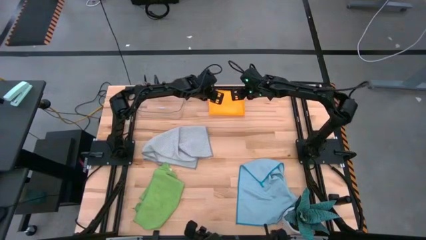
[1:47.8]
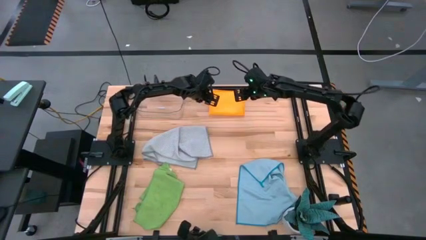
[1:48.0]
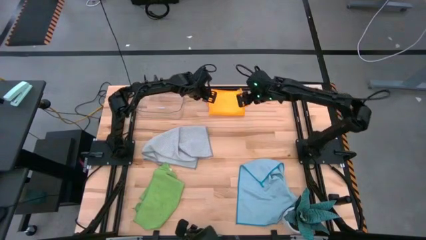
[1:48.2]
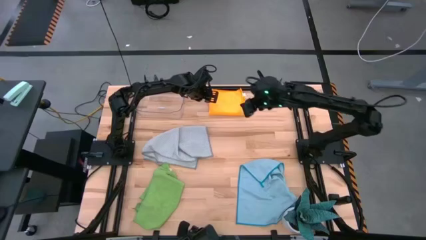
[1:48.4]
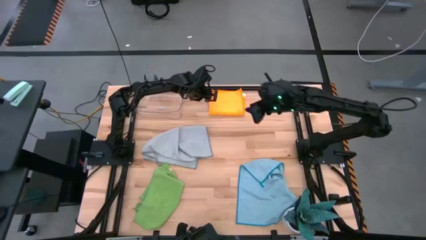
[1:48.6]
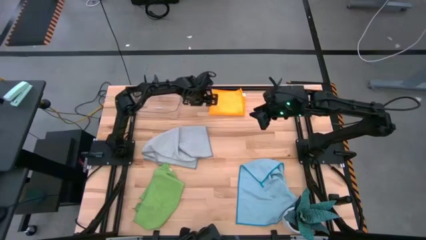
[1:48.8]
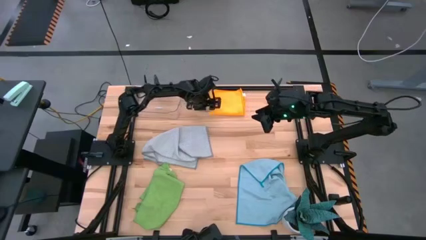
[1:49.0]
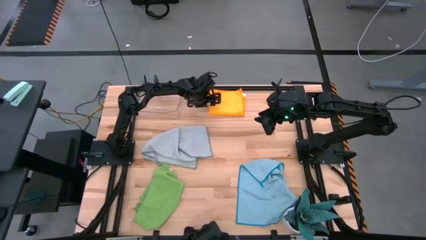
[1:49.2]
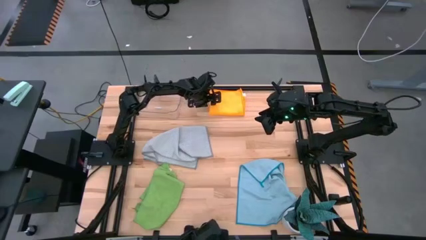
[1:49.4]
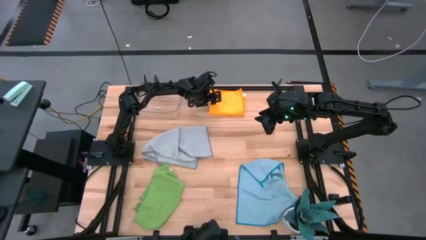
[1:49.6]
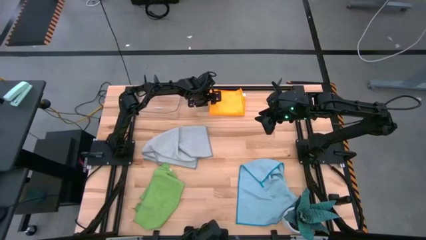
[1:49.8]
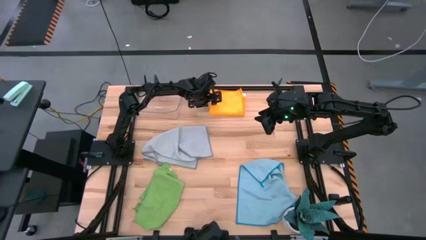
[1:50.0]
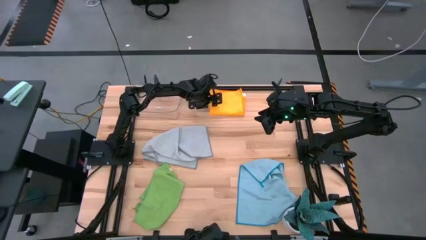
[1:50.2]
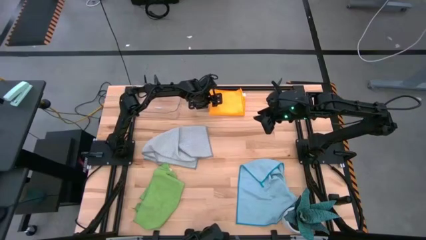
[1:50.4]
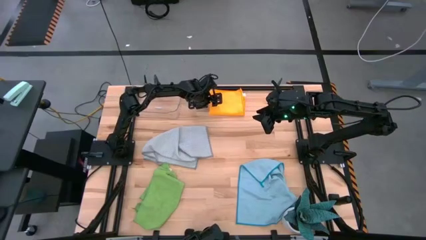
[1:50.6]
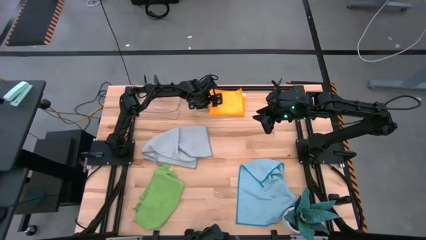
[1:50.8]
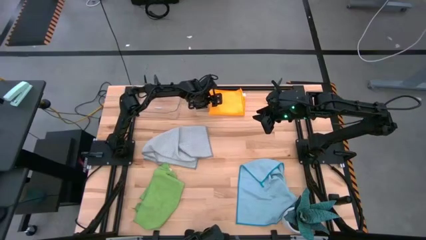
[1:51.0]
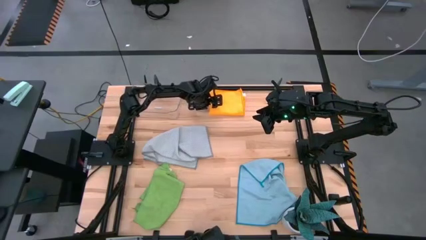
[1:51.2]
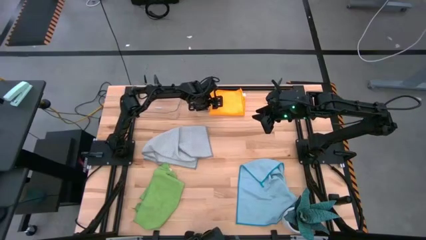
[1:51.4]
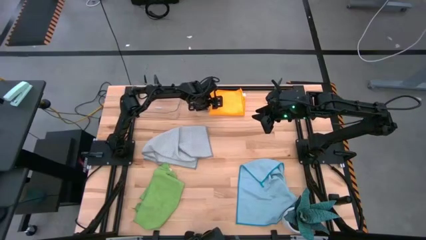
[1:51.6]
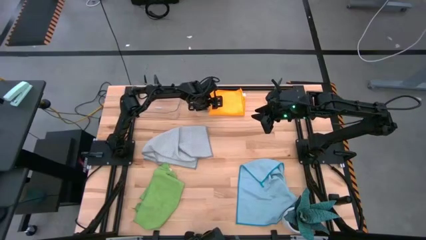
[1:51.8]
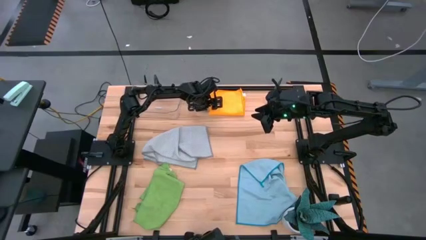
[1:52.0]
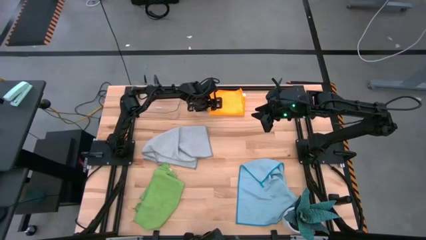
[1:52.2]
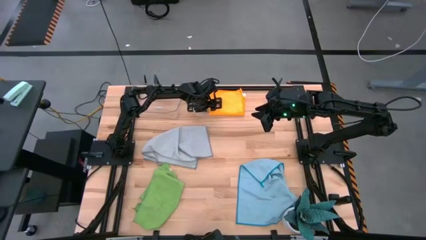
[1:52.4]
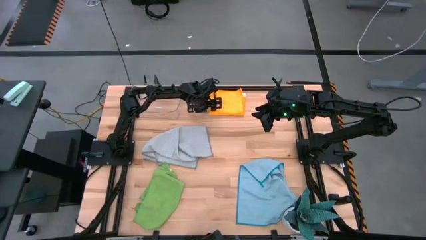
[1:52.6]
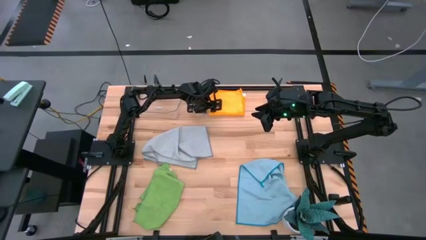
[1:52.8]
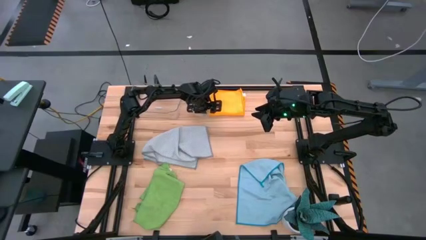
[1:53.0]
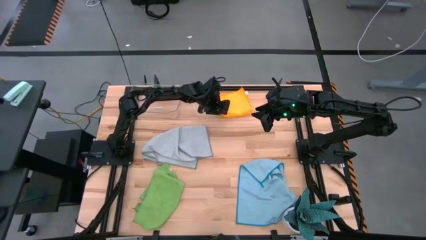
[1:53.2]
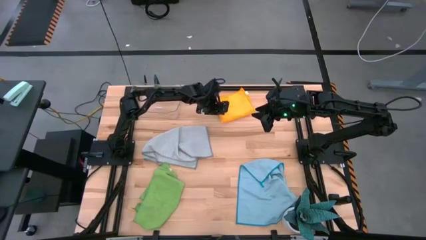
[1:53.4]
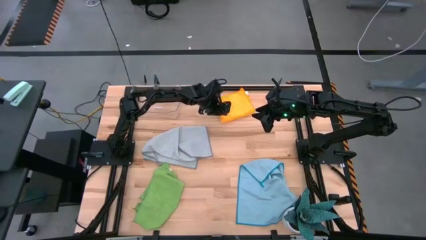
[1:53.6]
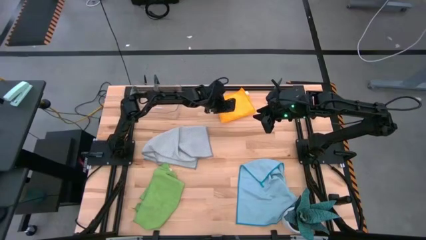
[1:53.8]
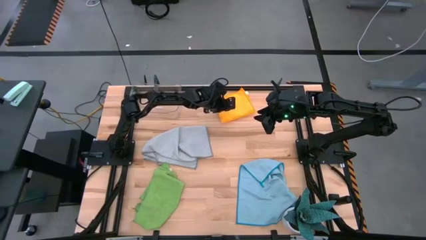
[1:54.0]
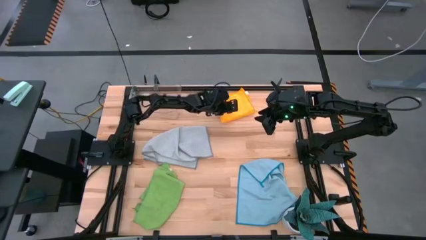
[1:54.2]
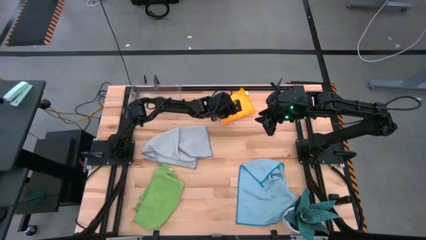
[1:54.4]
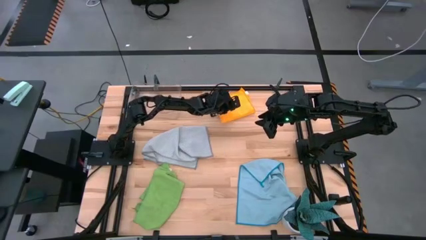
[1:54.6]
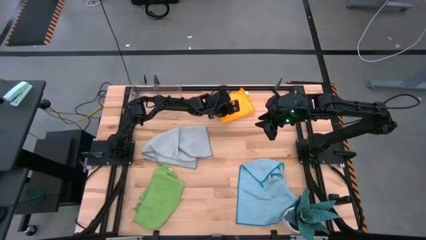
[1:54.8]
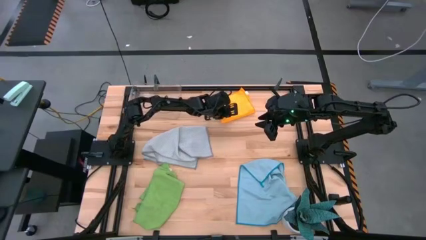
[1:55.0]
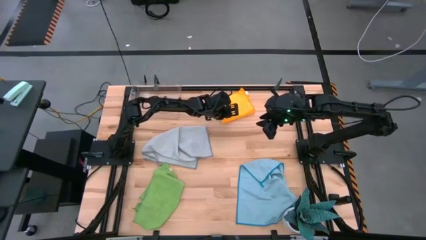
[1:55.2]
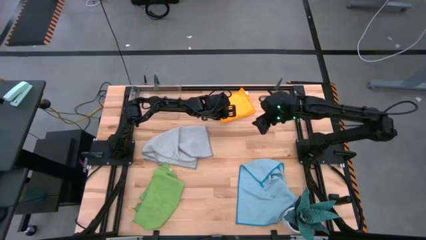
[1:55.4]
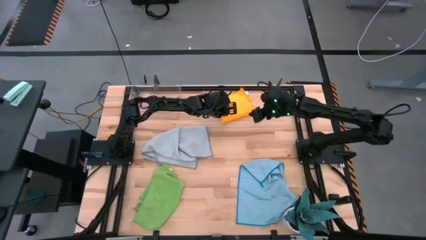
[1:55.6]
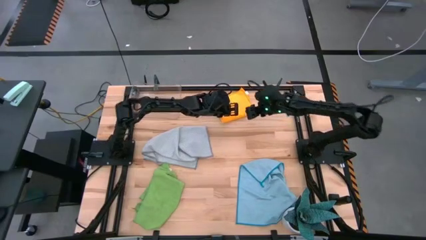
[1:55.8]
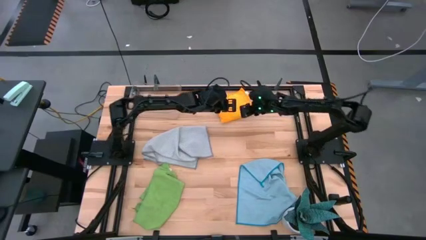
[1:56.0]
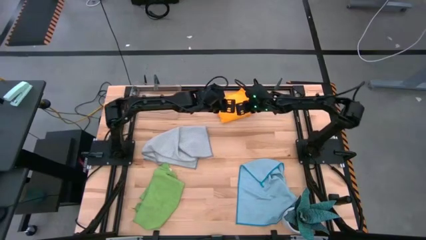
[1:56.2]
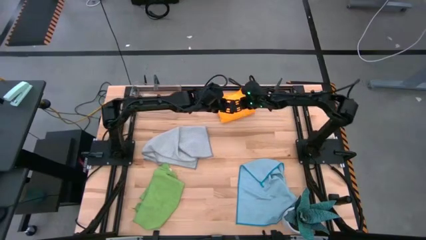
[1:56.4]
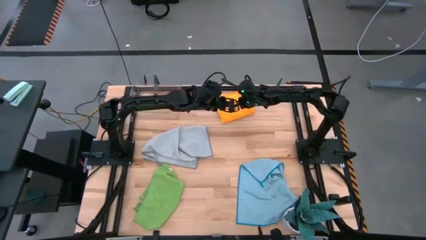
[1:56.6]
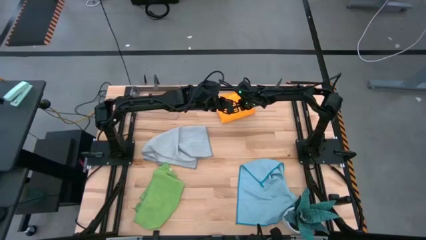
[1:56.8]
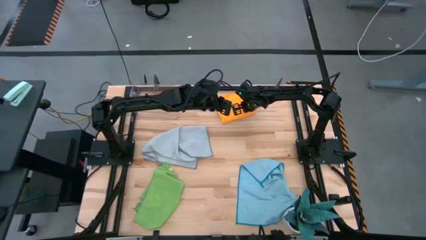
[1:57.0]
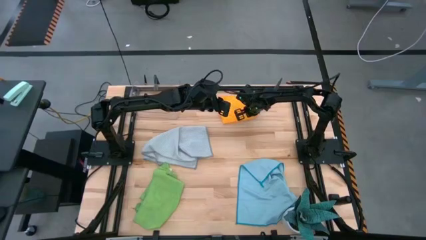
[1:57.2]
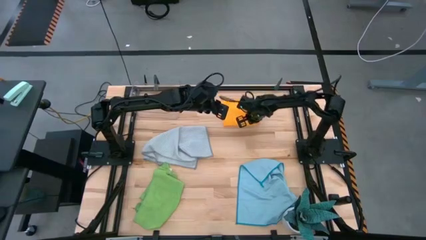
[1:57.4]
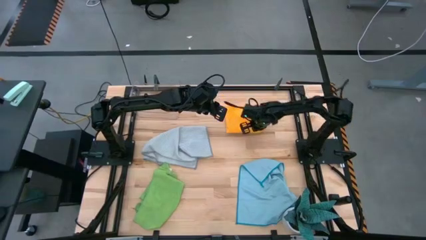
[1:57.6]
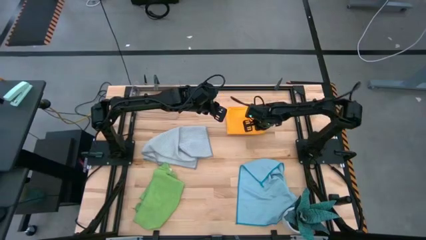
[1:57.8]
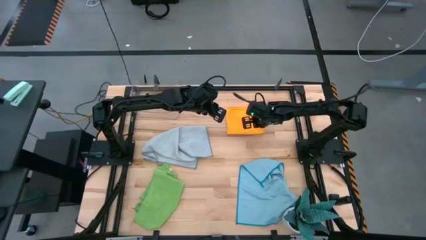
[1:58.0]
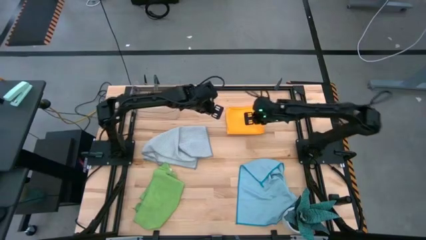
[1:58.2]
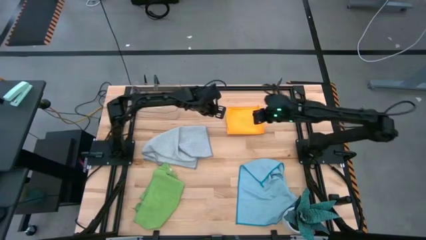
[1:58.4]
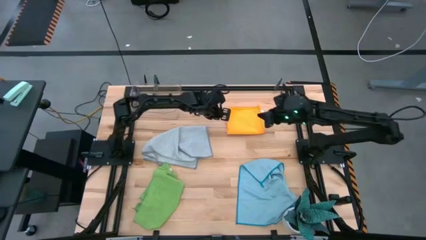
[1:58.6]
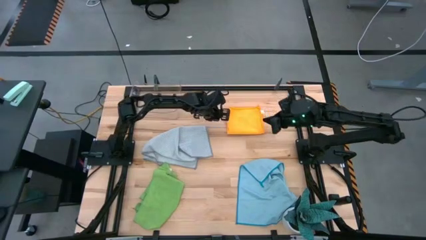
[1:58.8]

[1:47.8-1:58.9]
Task: Fold microfiber towels
Put the orange microfiber cloth into the transparent bin

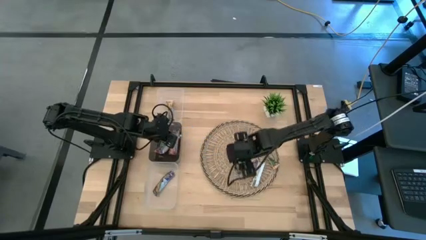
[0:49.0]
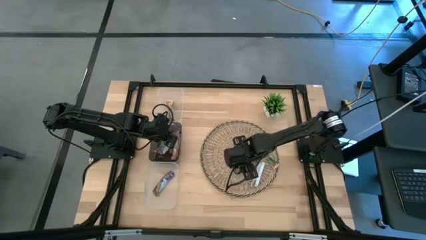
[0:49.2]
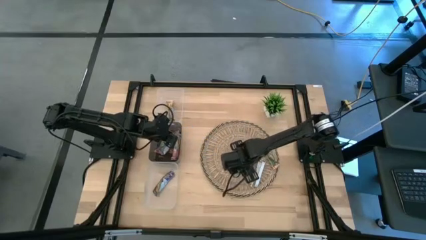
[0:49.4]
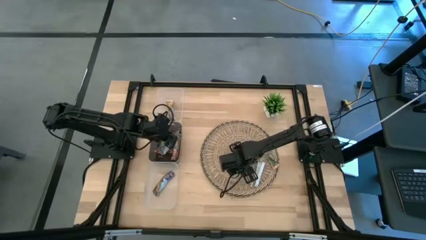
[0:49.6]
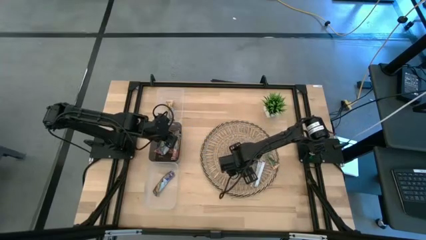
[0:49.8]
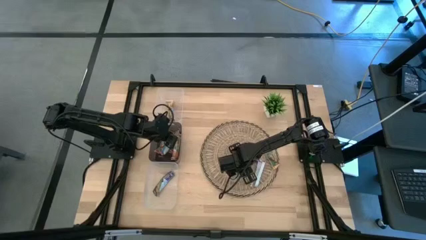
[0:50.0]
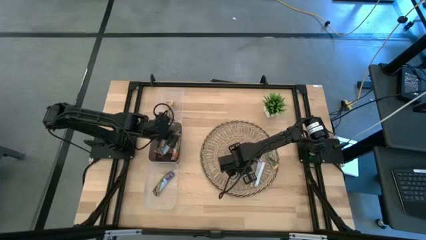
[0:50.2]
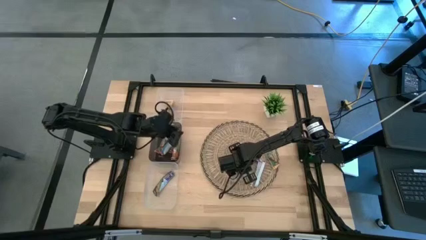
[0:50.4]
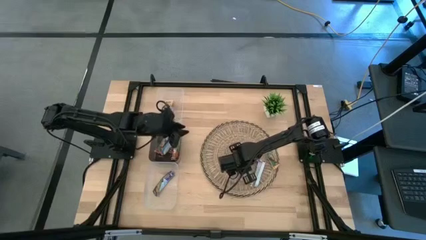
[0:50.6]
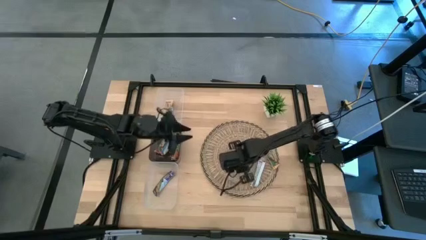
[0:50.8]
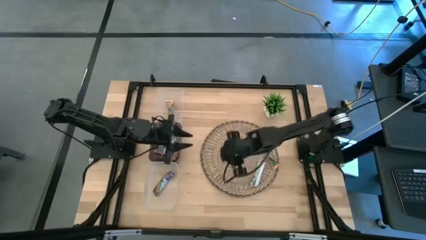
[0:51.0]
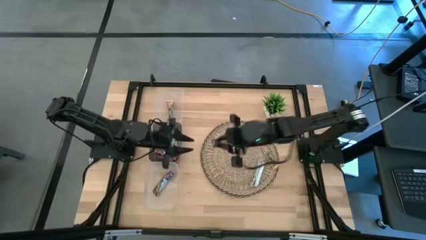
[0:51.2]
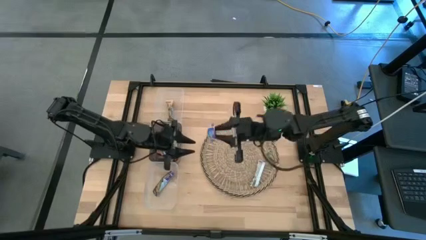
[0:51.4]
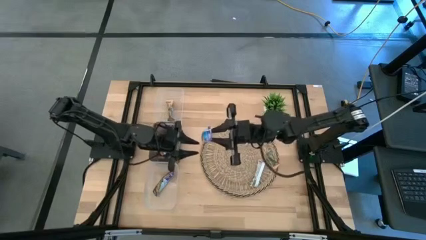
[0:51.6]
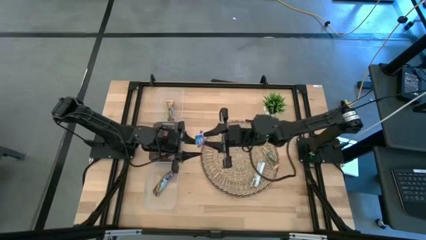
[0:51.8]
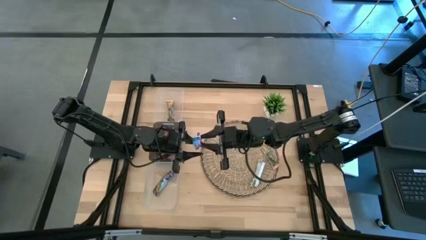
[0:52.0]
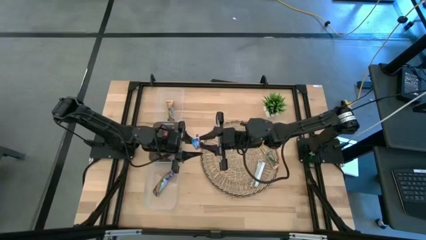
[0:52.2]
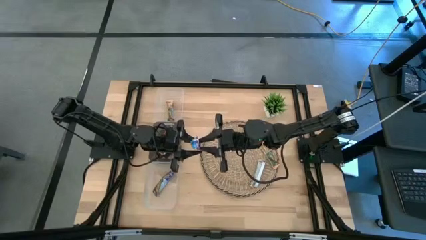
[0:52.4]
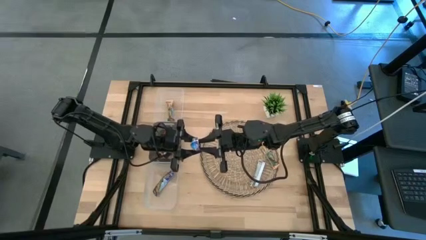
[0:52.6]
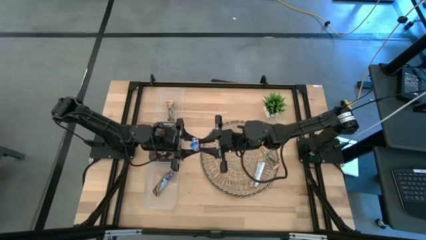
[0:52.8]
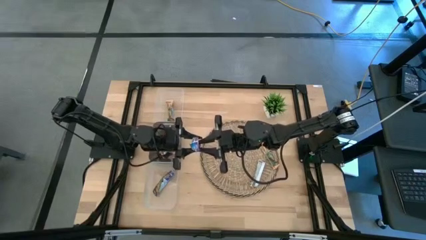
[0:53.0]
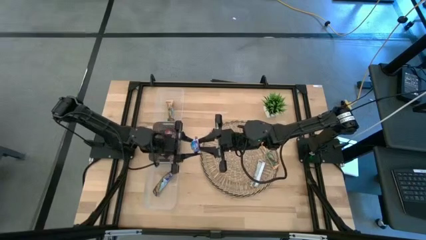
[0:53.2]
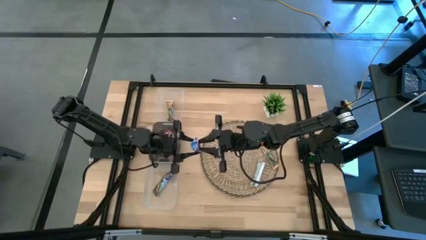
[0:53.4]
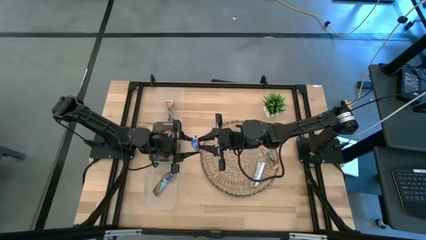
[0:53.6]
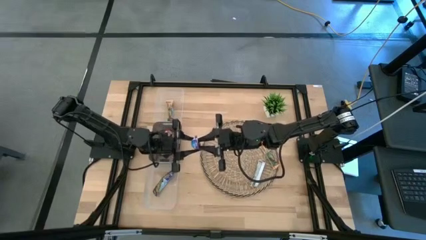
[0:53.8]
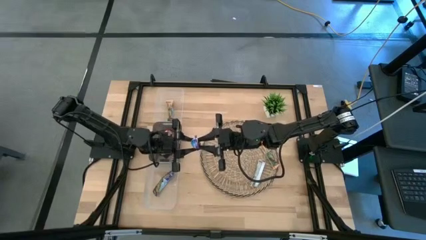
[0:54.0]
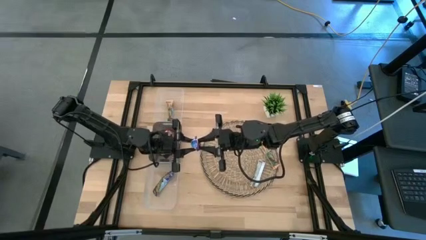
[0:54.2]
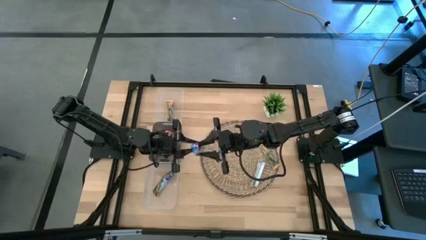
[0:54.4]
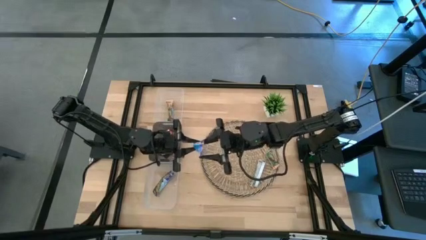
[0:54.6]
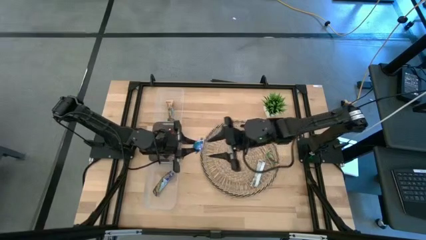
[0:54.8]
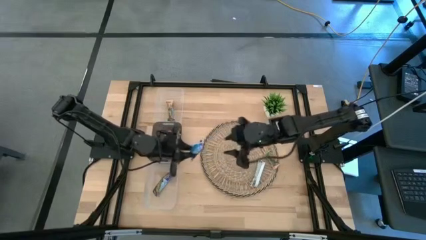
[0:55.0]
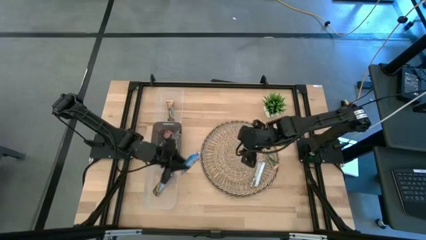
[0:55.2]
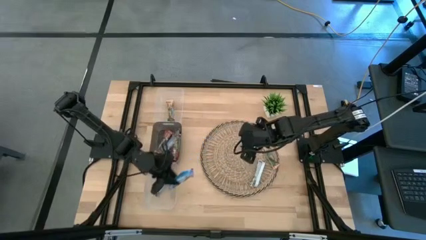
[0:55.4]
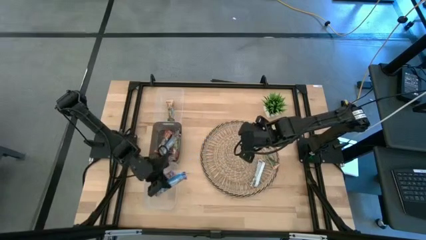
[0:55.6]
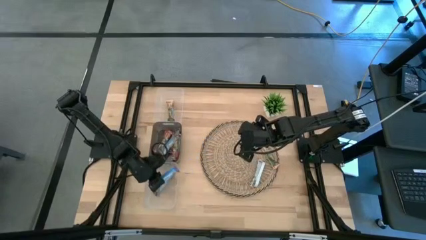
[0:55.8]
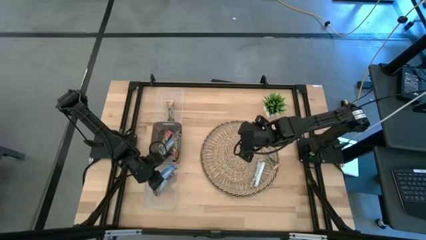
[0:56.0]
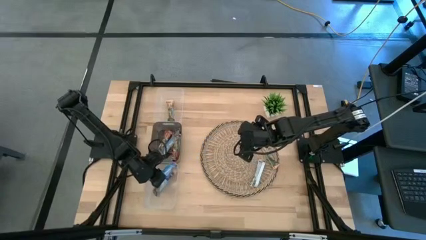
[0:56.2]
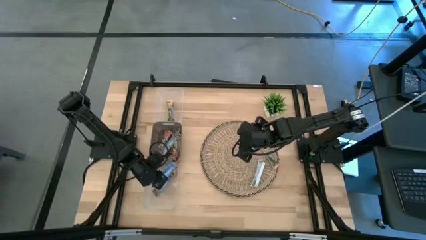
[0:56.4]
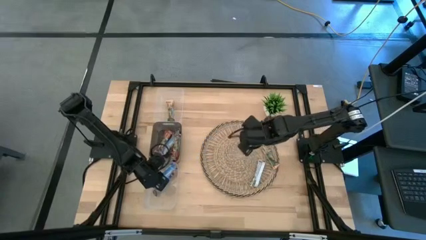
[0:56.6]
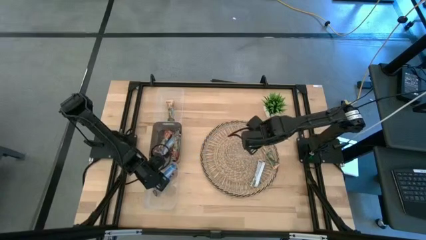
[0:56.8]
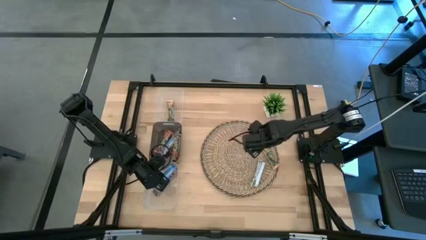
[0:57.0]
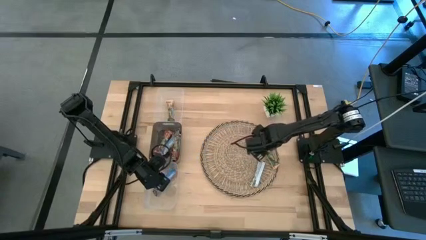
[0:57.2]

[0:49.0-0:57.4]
Task: Pick and place Granola Bars by type
Put the blue granola bar into the bottom transparent bin
